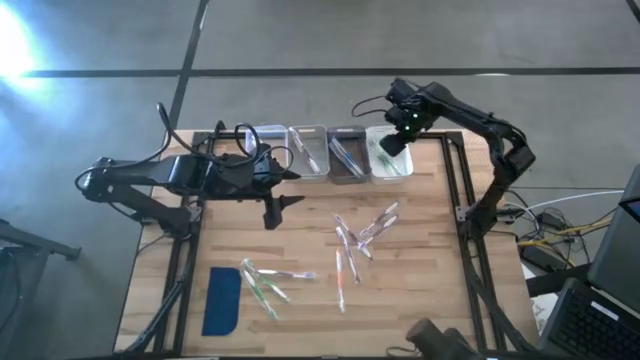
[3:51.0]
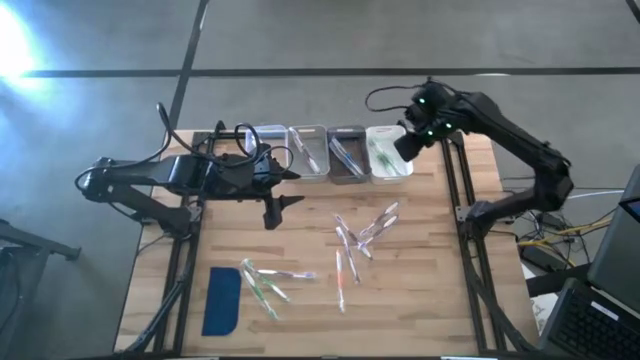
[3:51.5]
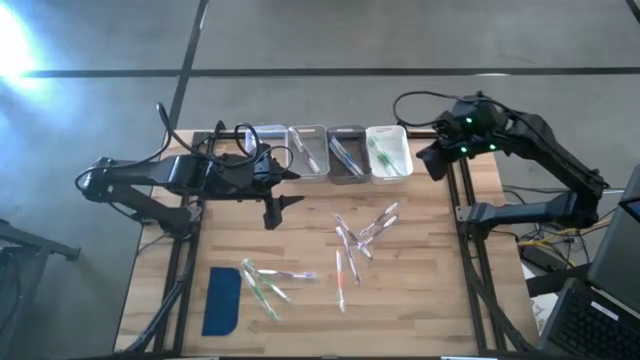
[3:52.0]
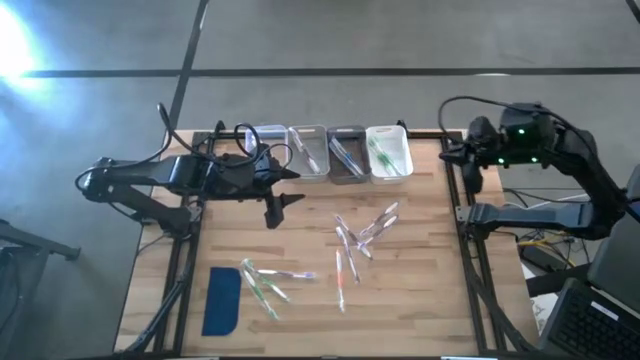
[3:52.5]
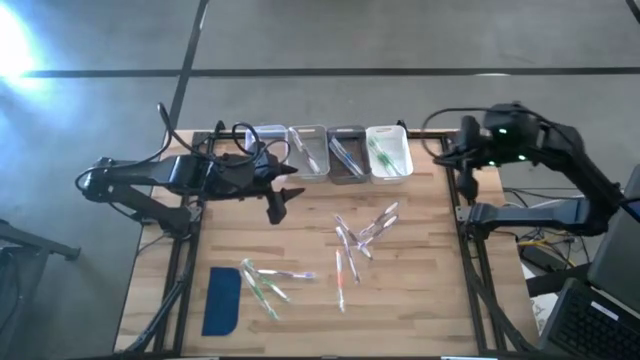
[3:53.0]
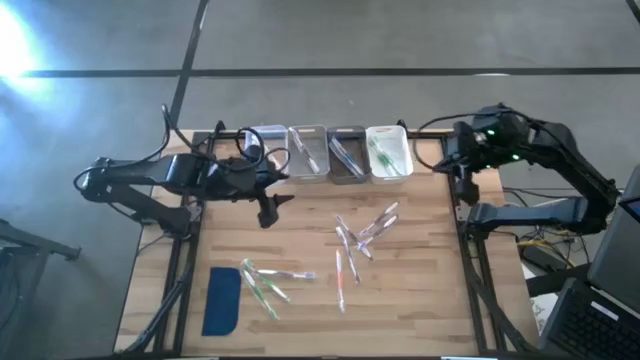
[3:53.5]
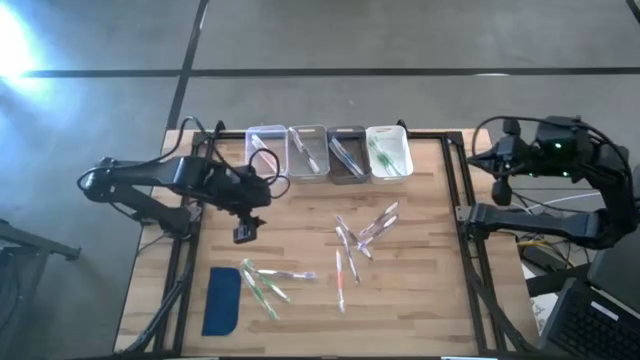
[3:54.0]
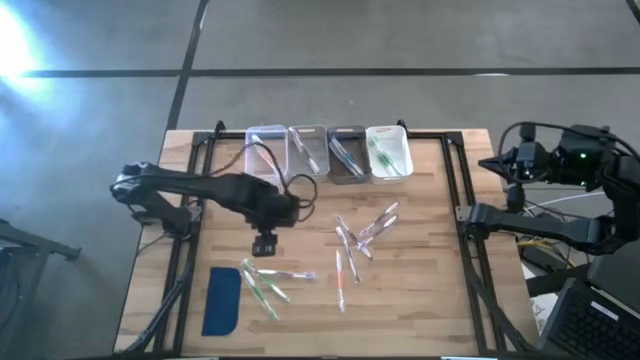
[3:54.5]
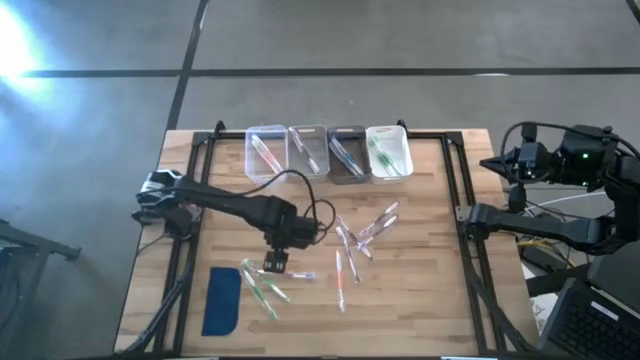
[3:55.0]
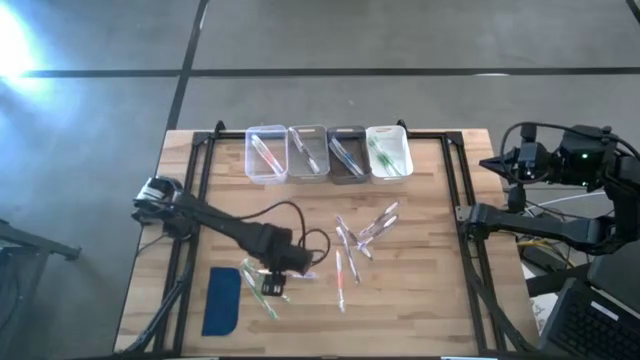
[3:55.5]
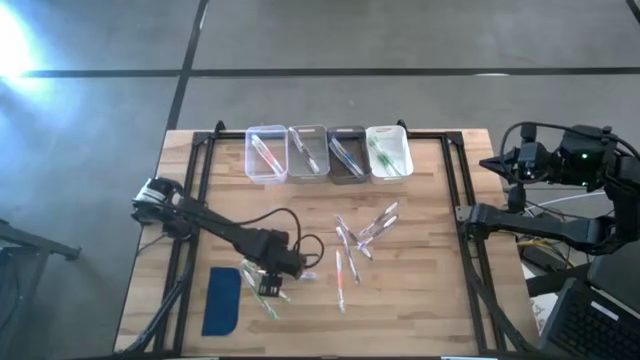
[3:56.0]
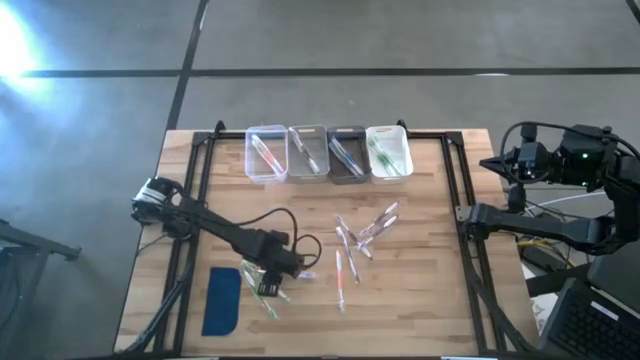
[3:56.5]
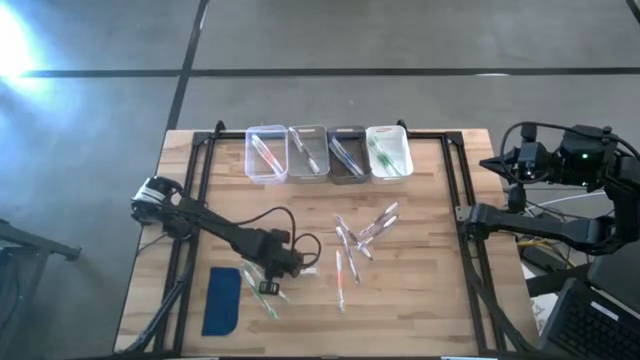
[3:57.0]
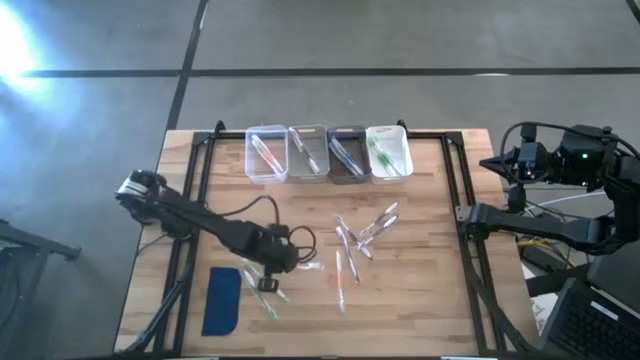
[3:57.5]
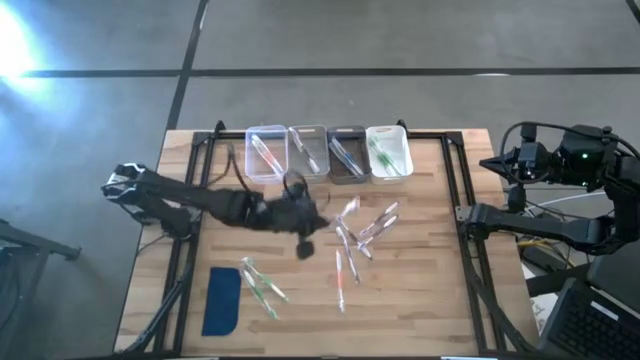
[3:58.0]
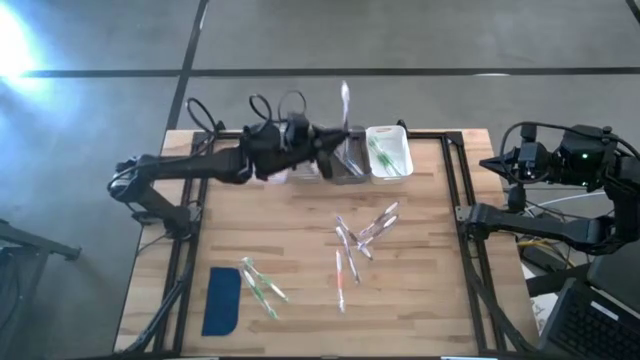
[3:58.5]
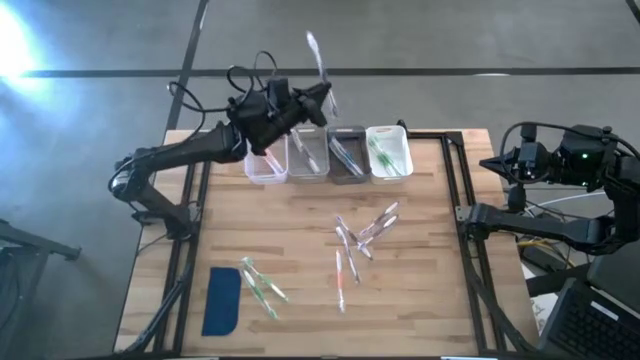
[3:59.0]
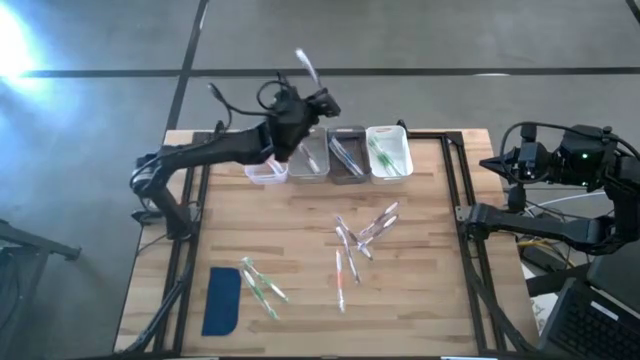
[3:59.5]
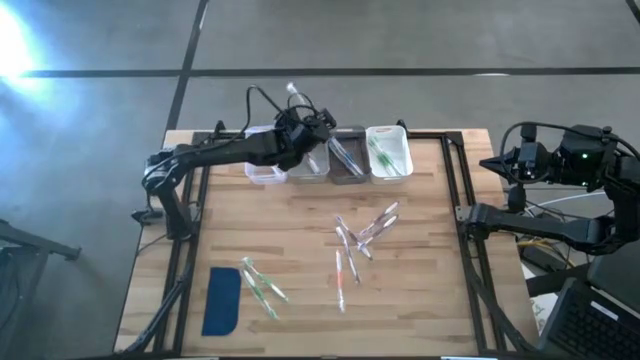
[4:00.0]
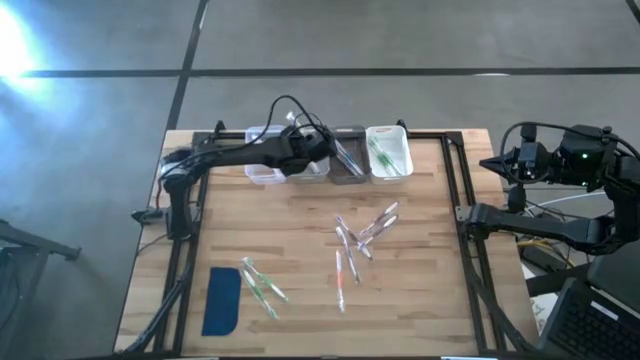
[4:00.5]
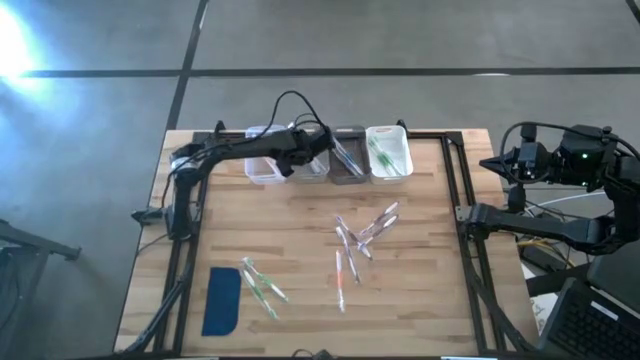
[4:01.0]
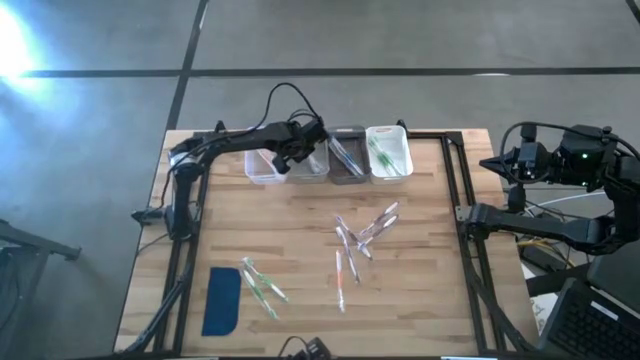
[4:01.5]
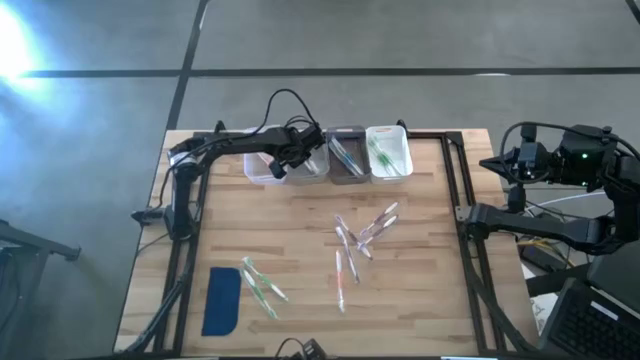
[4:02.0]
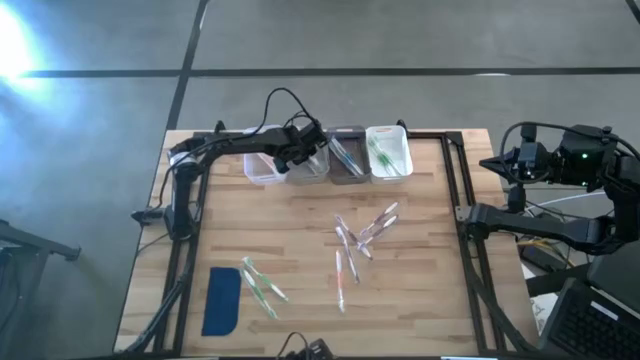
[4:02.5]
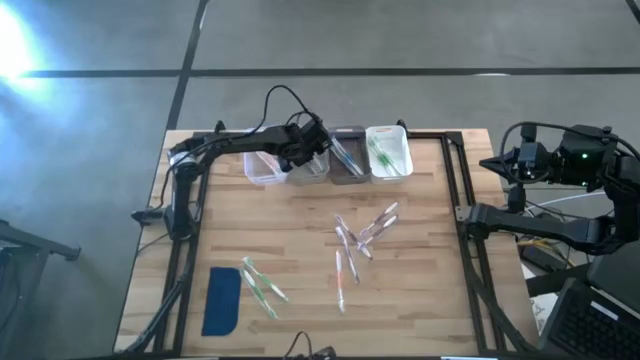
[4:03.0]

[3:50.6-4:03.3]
Task: Pick & Place Toothbrushes
Put the purple toothbrush into the gray bin

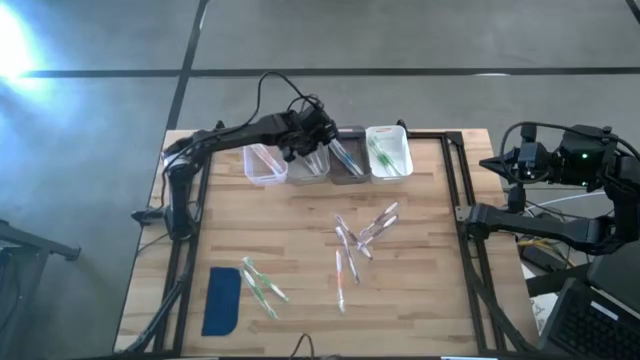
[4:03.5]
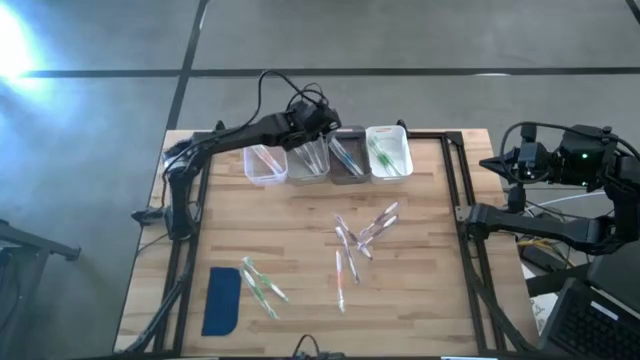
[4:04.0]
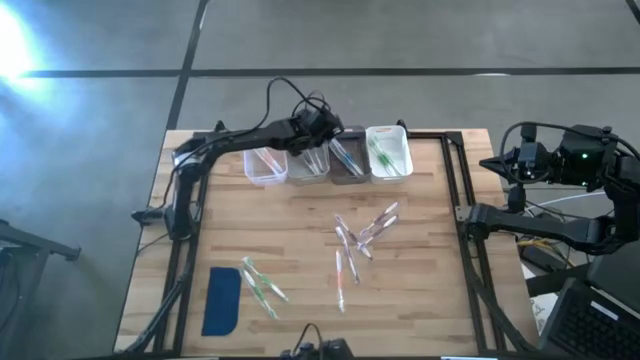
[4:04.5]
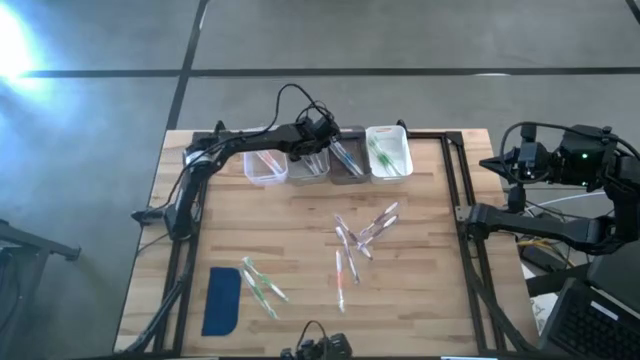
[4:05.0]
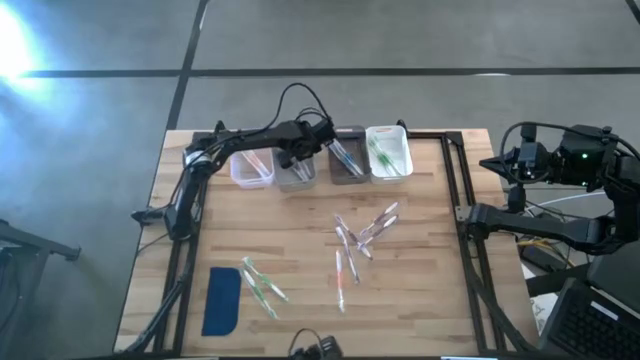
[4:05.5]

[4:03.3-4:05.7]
Adjust the gray bin

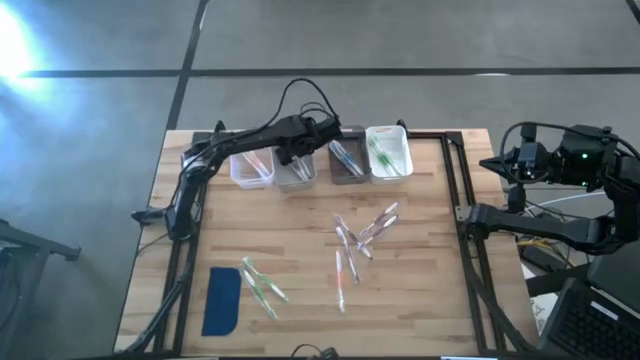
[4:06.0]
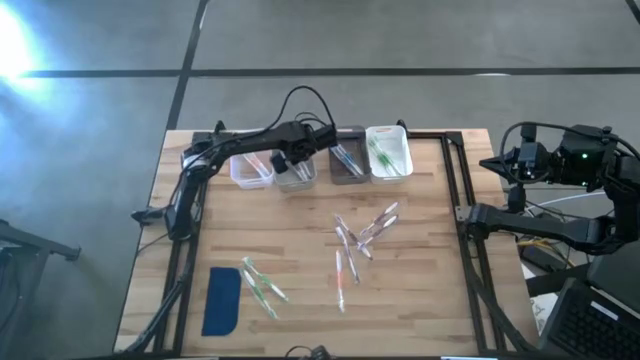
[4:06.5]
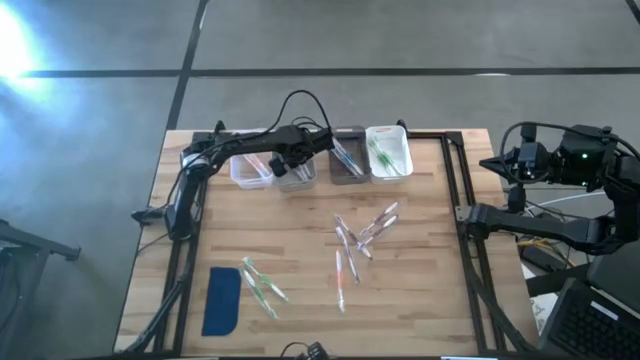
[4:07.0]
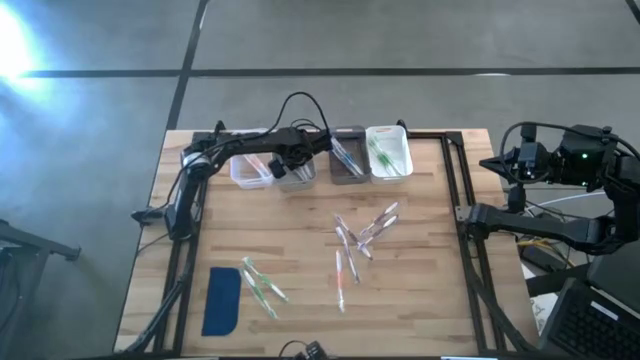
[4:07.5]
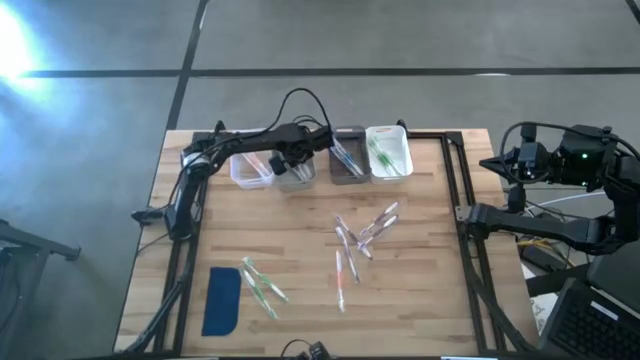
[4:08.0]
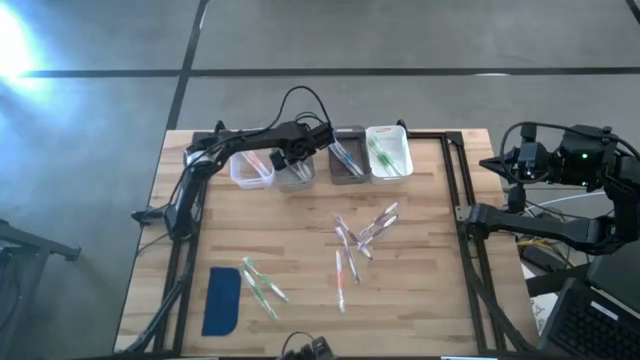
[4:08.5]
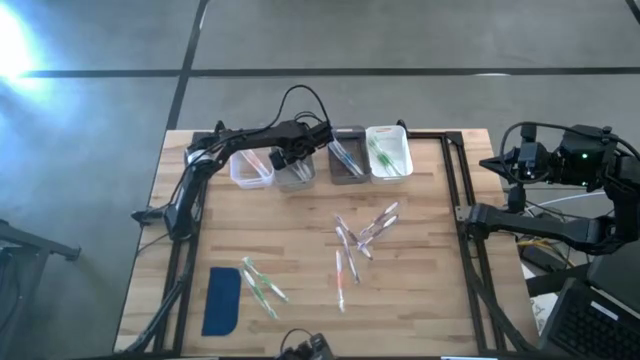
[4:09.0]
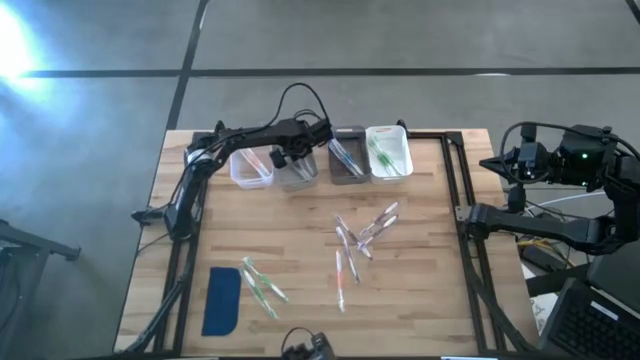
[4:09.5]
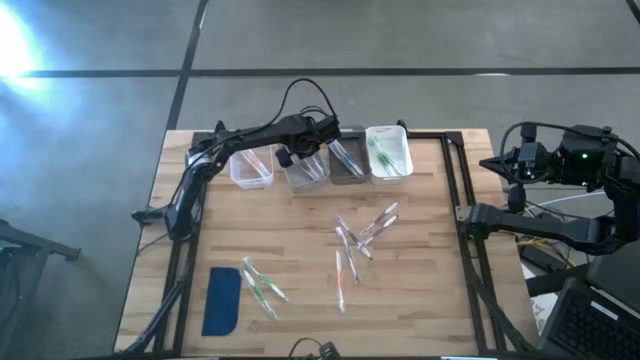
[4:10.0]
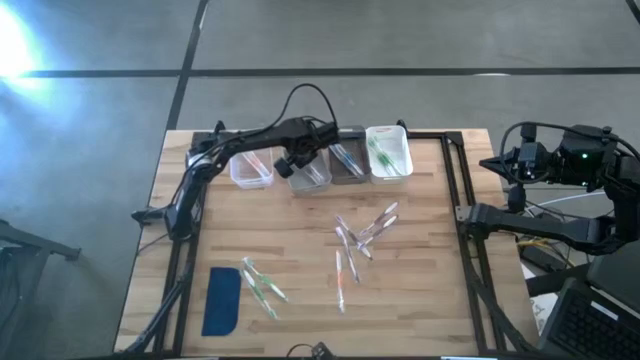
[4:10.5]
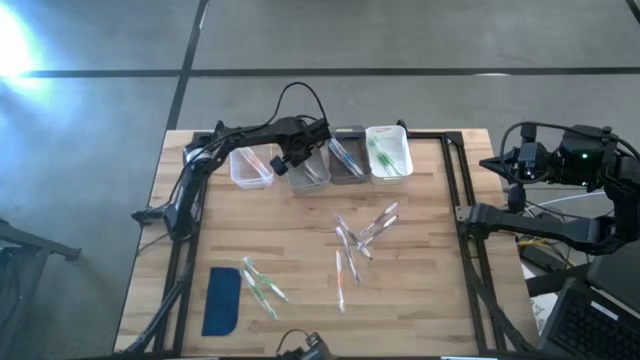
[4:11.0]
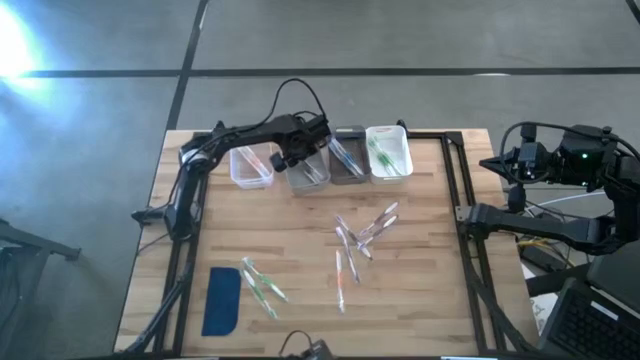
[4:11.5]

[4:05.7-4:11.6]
Adjust the purple toothbrush

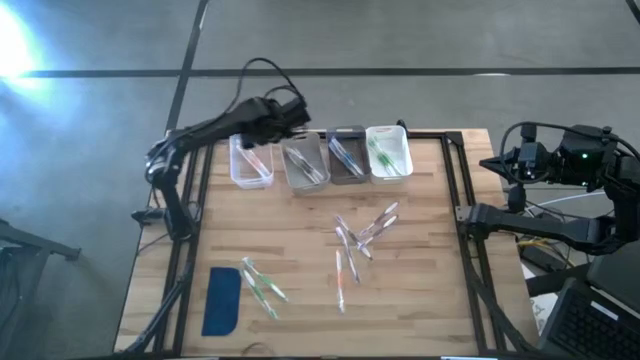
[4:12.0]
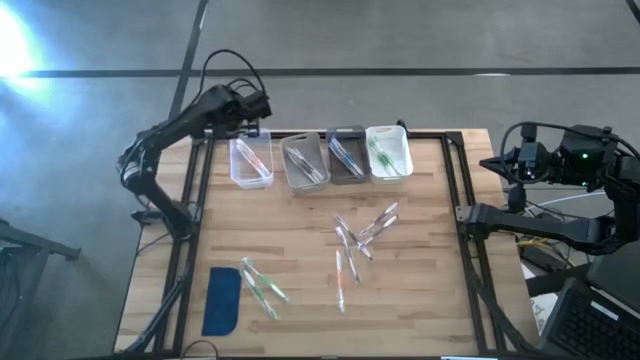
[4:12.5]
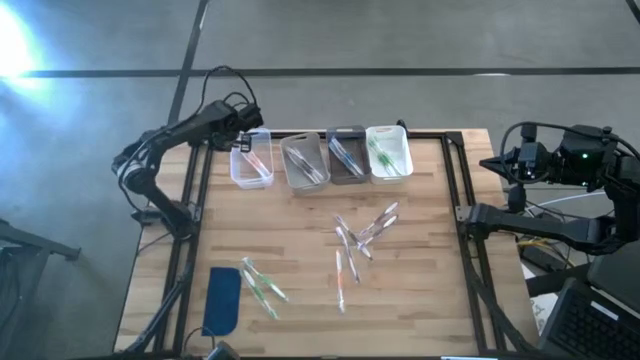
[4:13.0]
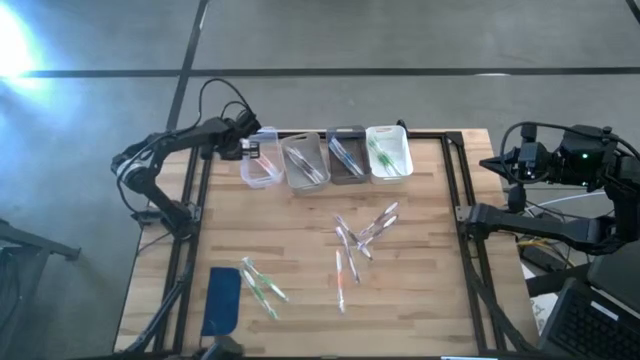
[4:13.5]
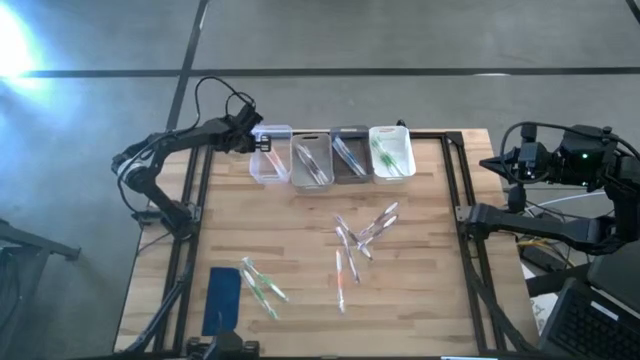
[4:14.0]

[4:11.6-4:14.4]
Adjust the white transparent bin
